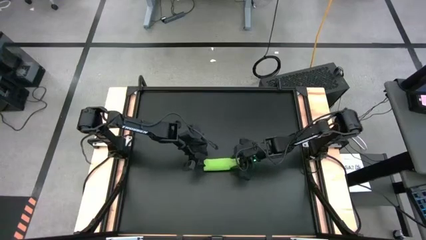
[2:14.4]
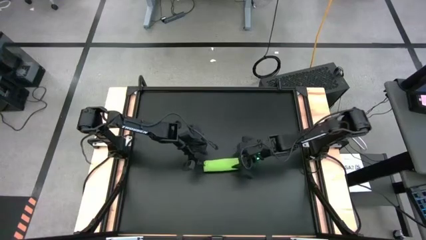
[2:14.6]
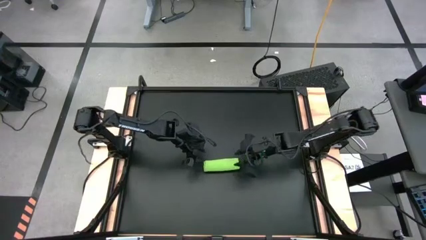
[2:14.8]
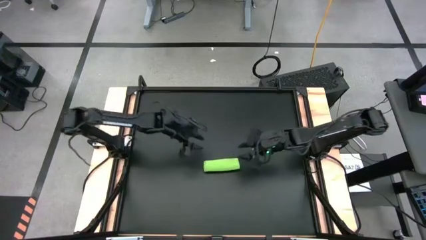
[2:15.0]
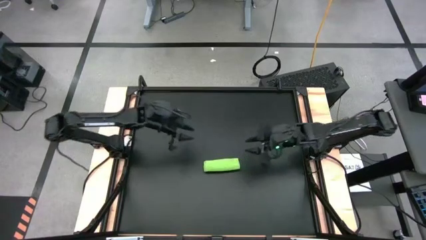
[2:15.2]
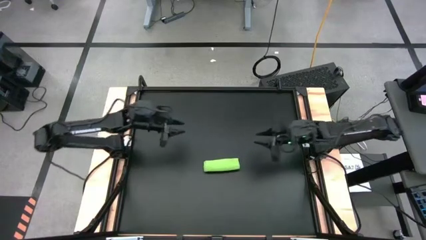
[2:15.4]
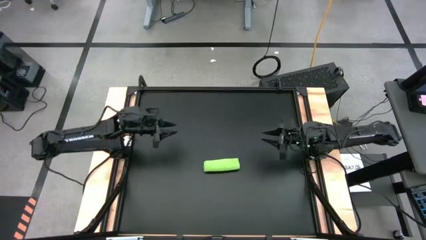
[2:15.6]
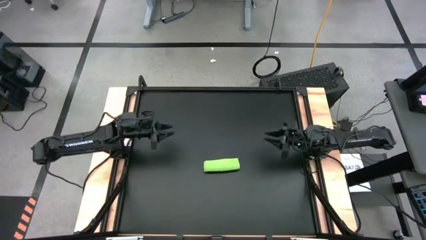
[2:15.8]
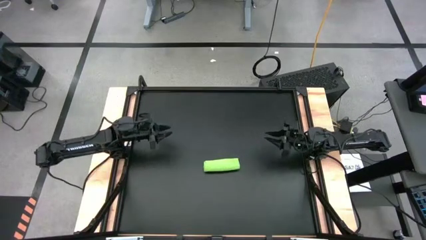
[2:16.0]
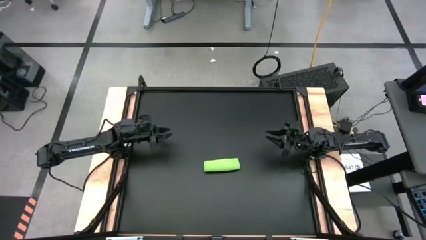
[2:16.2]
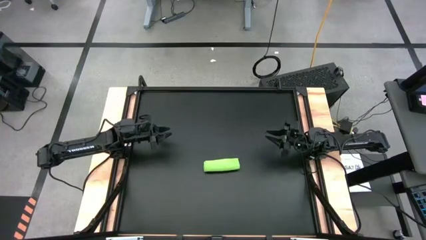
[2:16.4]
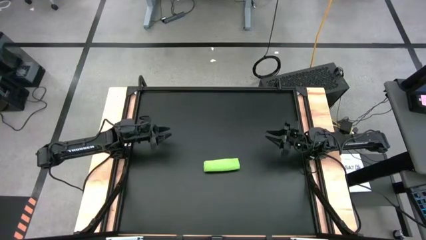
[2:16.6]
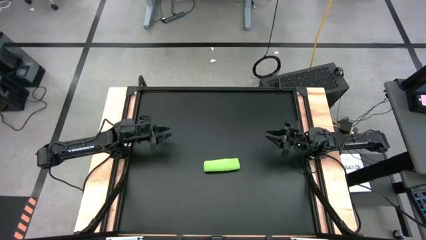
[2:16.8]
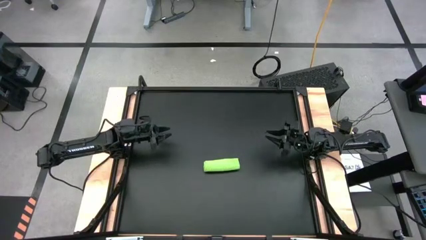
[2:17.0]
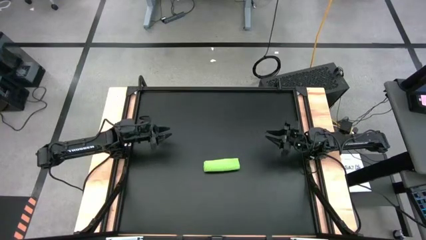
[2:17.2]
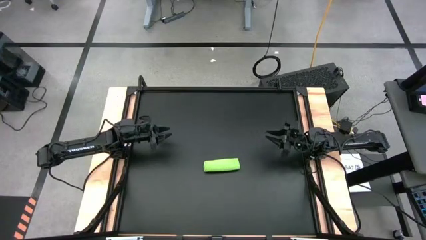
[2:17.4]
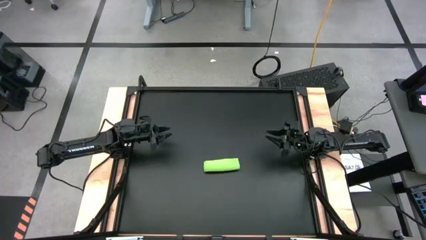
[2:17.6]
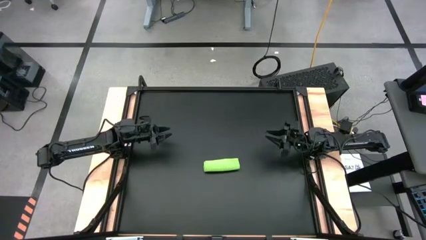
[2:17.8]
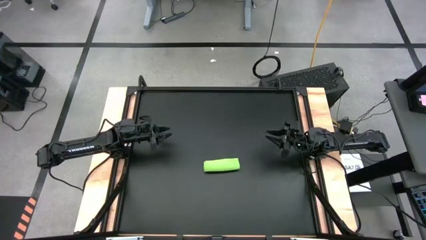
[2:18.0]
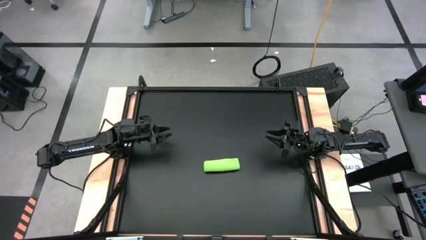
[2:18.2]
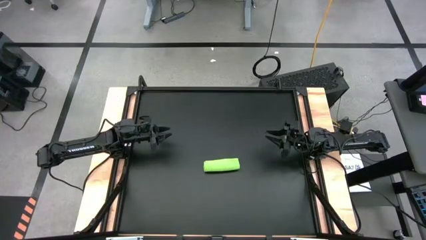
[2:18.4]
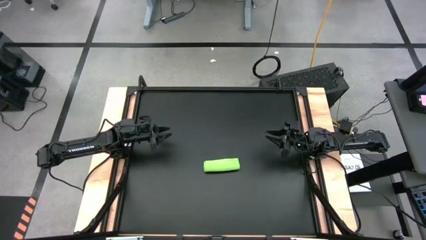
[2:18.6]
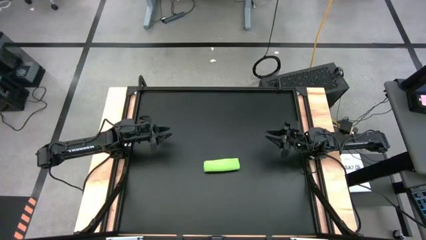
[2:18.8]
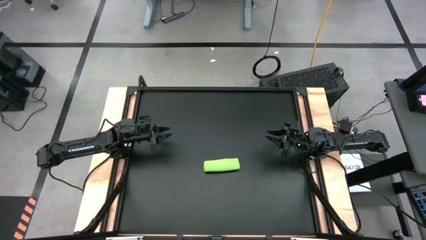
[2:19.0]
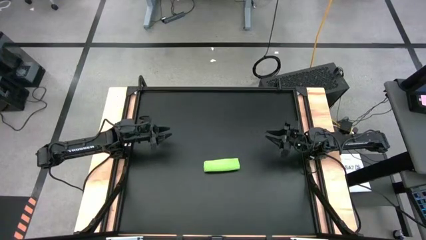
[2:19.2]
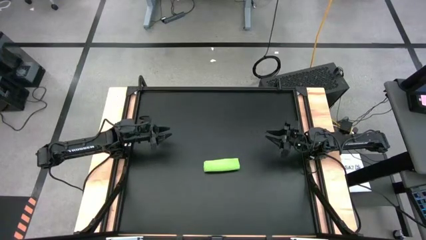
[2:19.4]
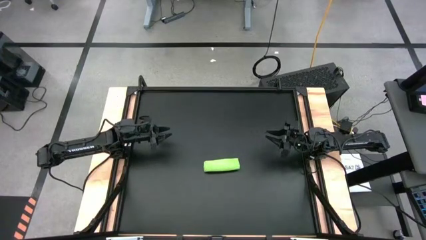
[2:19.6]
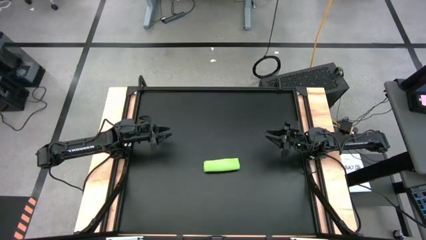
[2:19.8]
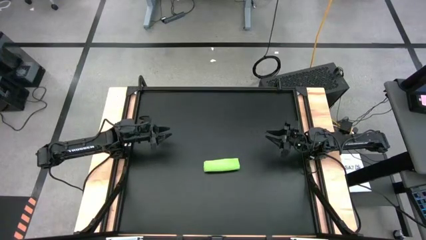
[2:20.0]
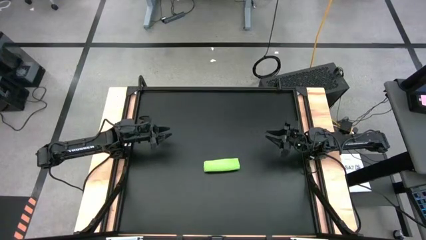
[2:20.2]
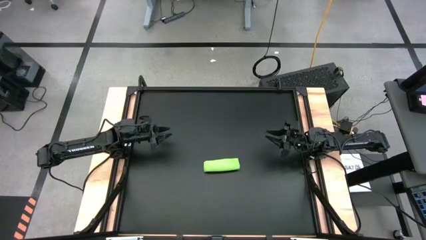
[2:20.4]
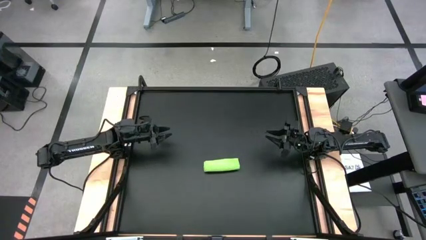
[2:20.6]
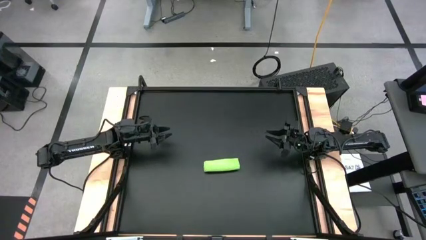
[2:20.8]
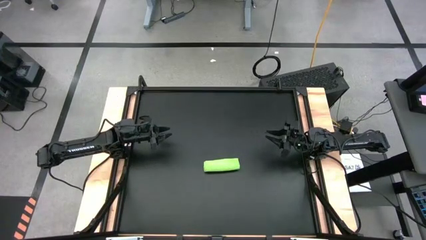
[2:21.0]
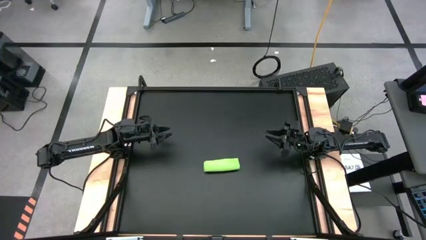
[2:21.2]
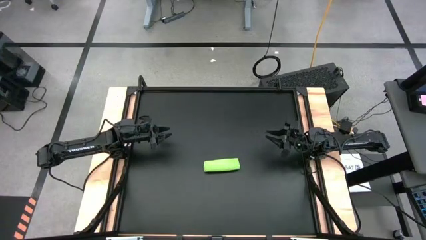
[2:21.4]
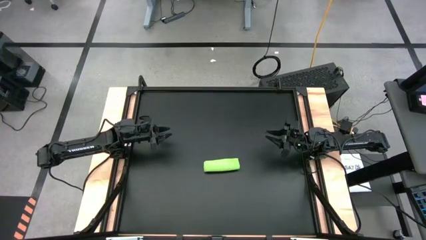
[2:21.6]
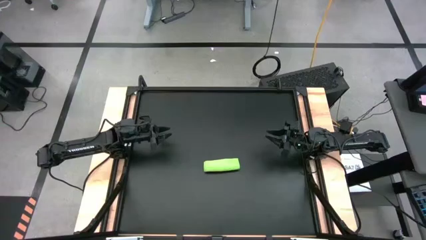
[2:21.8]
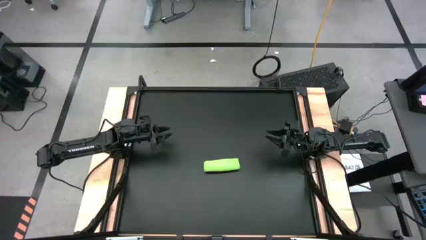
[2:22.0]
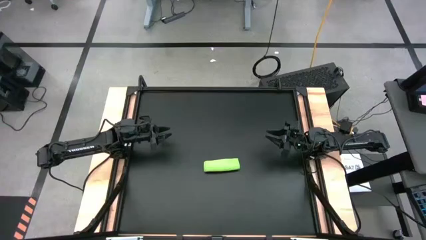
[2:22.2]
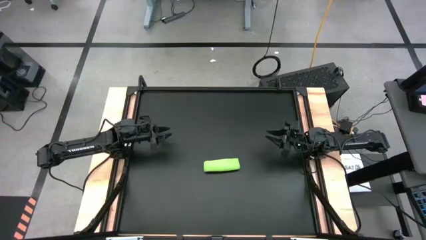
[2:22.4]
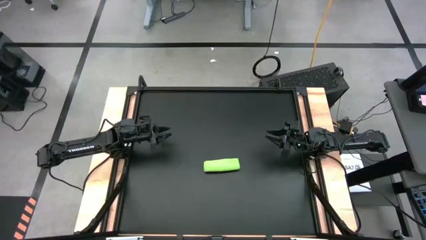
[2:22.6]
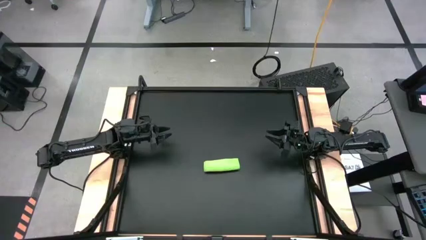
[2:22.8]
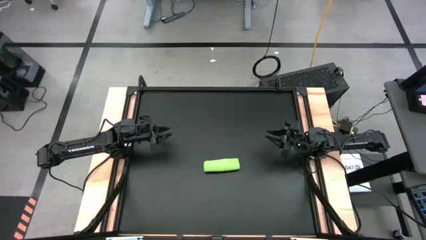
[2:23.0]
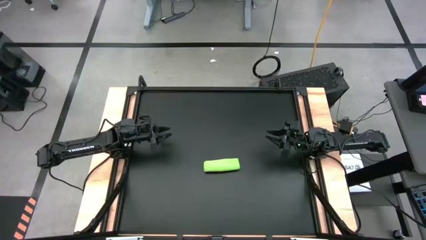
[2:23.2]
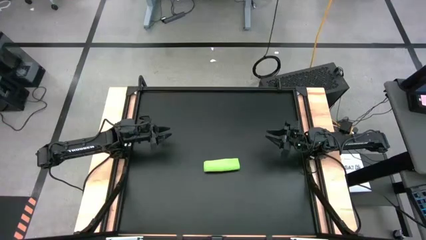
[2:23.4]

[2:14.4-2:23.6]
Task: Roll towel into tight, uniform cylinder
Return to Home Position
